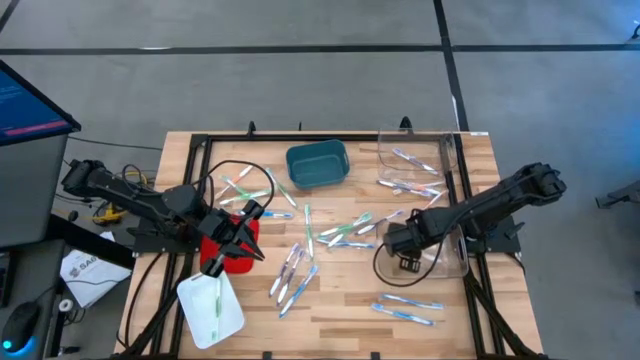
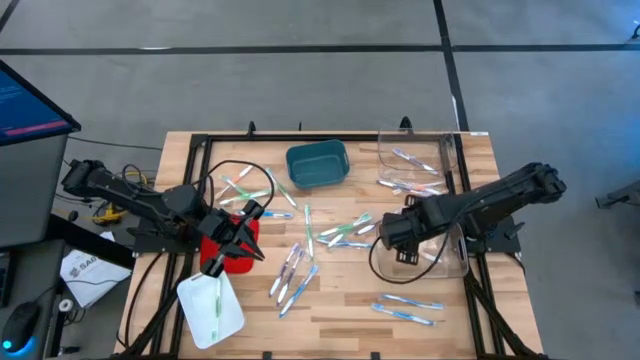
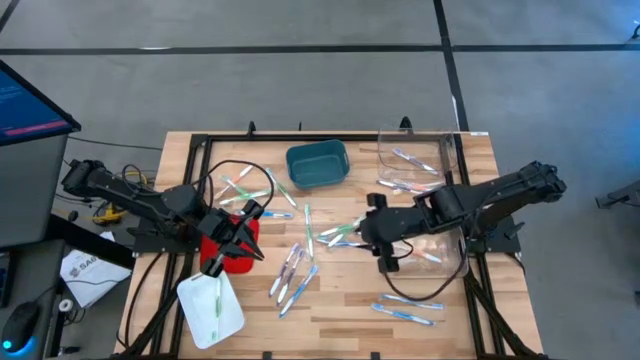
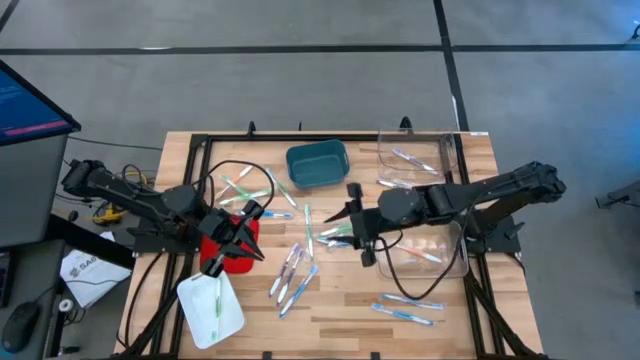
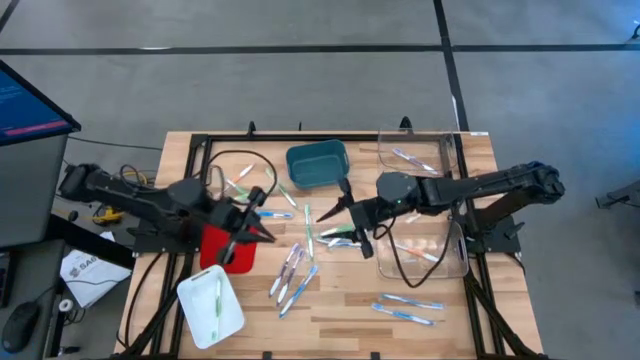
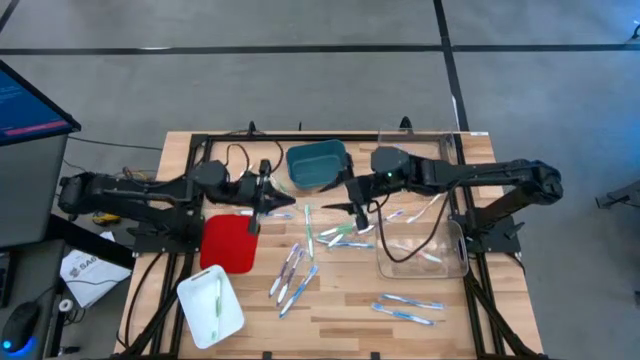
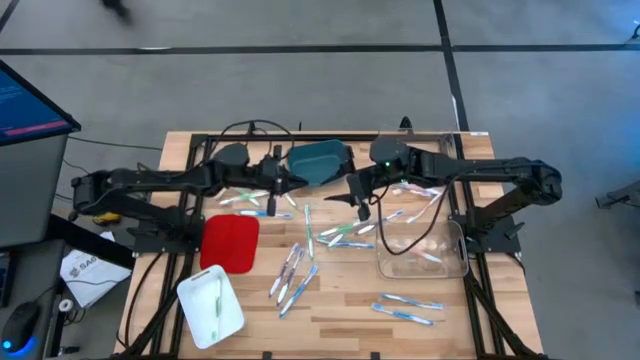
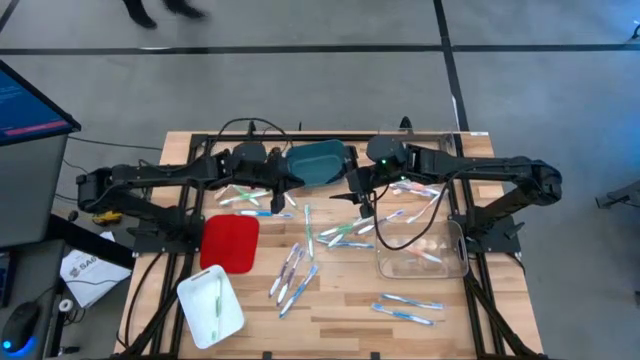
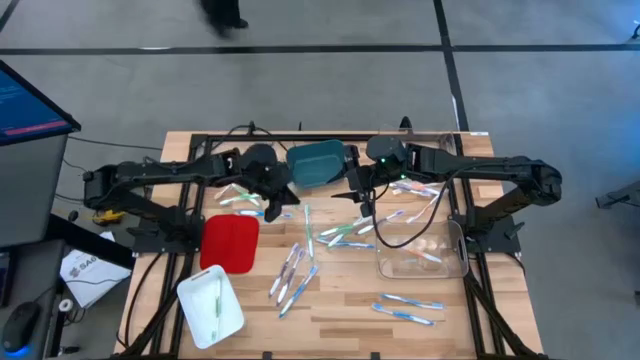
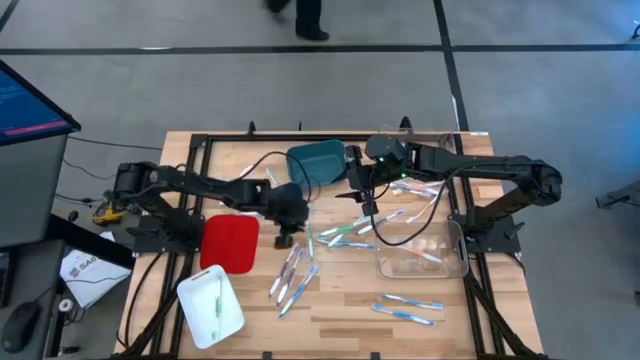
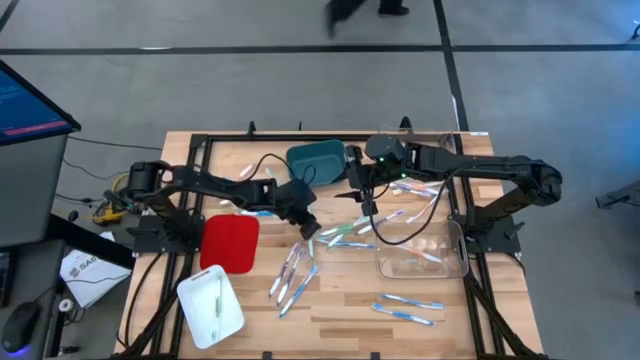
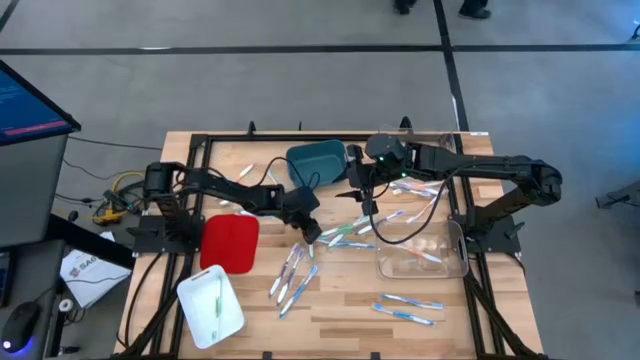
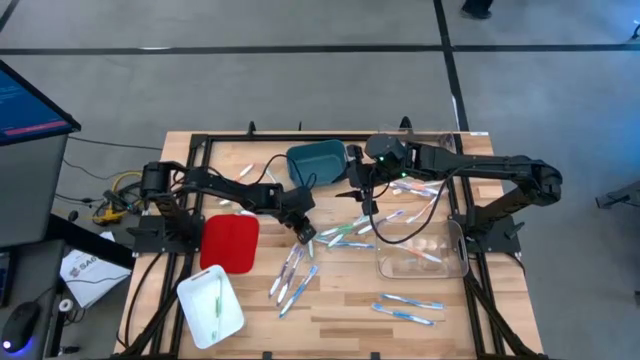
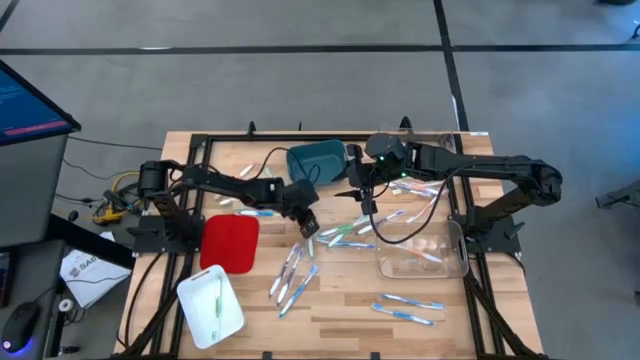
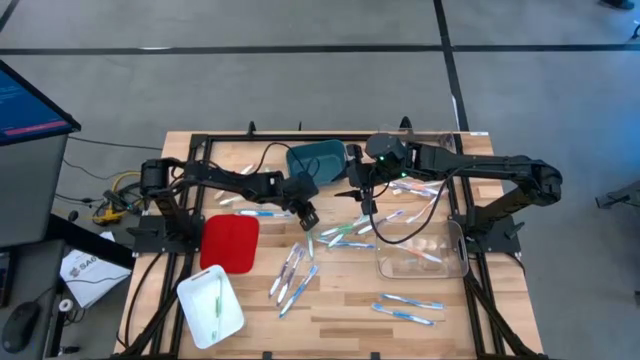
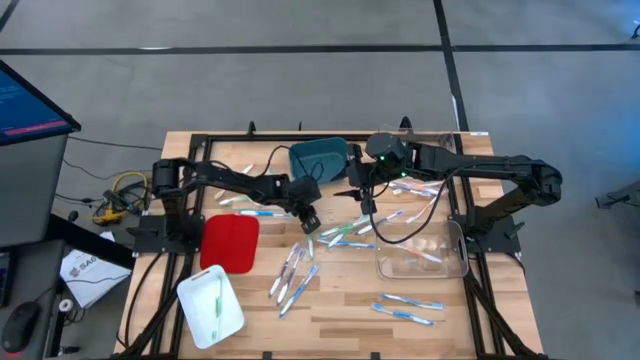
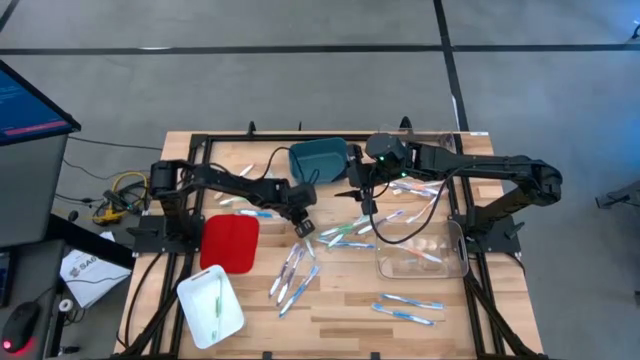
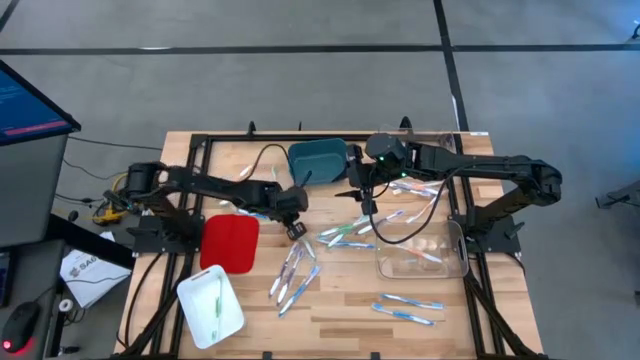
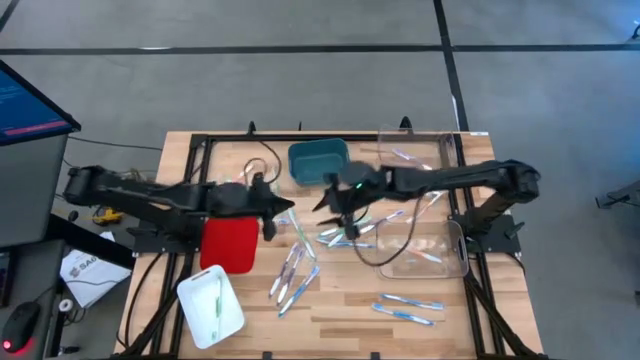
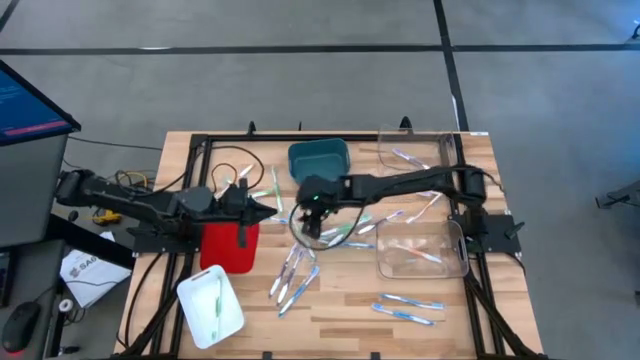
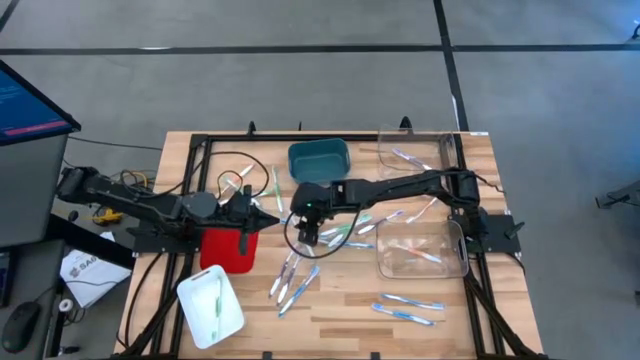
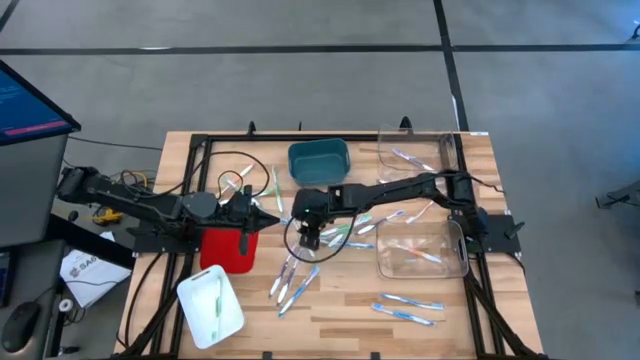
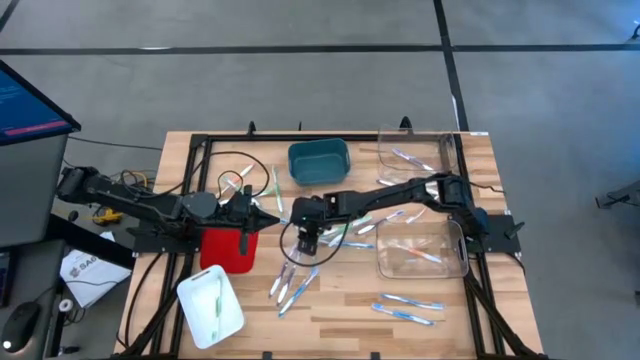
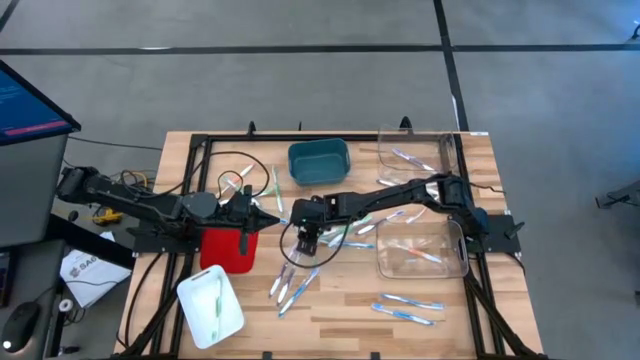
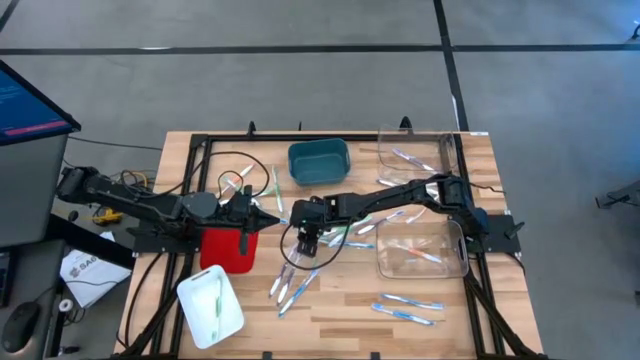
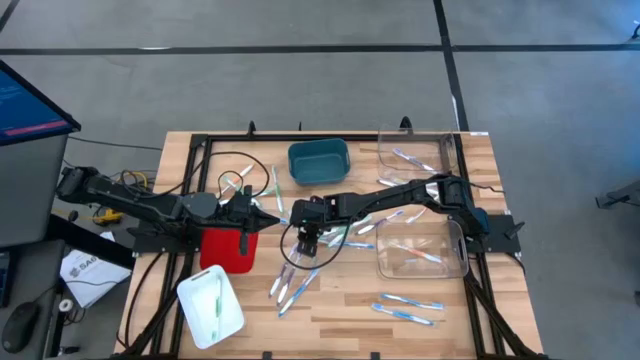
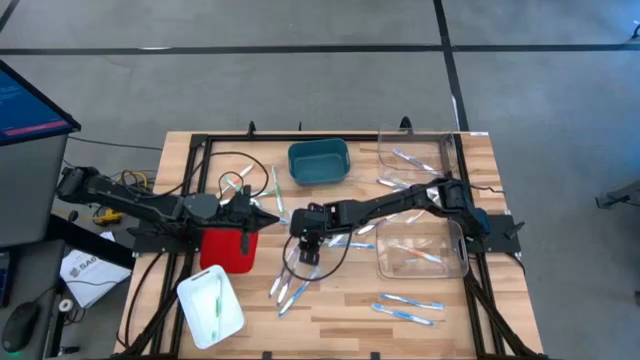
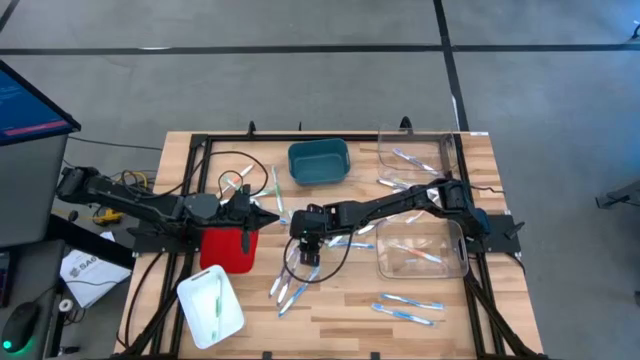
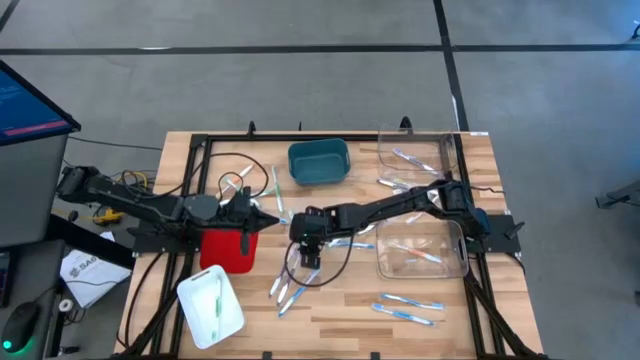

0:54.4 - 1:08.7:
Task: Pick & Place Toothbrushes
Put the purple toothbrush into the top transparent bin

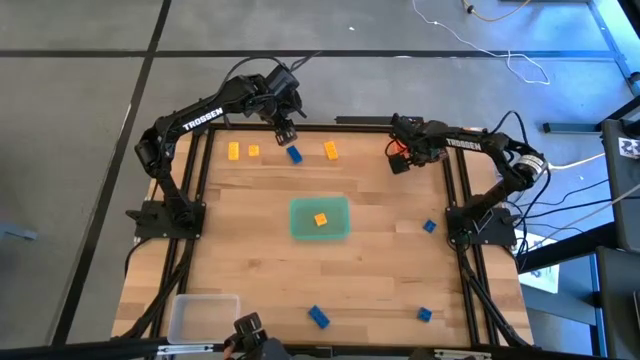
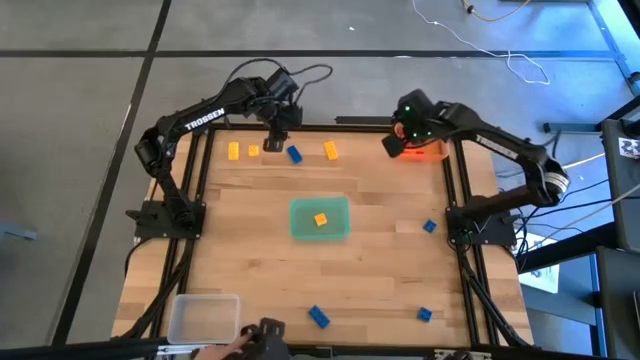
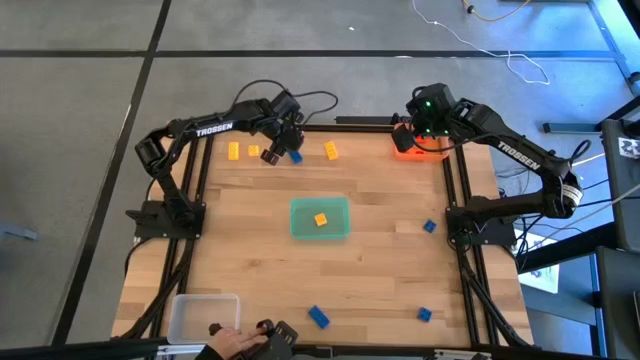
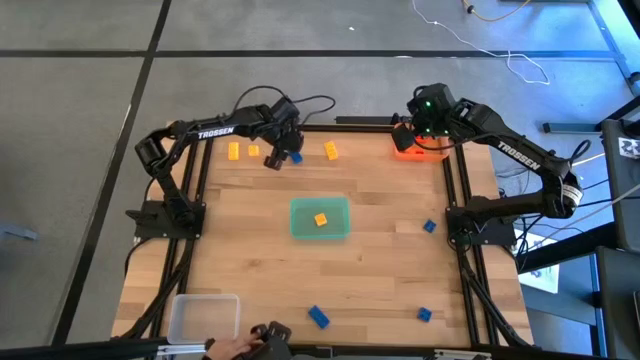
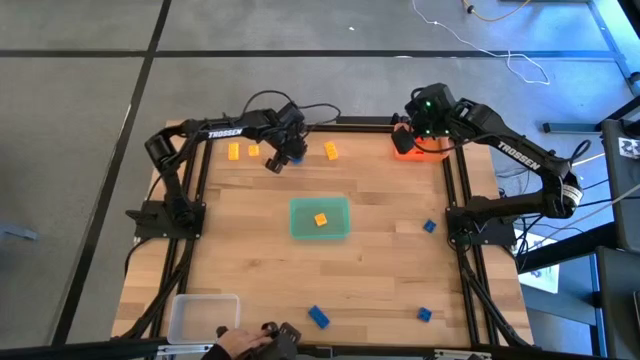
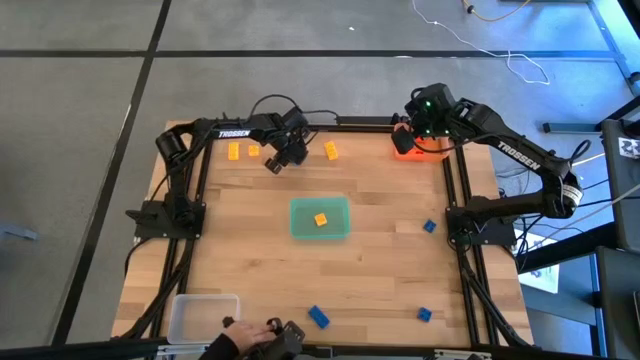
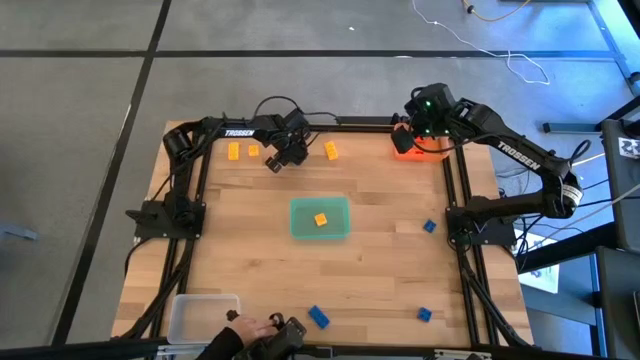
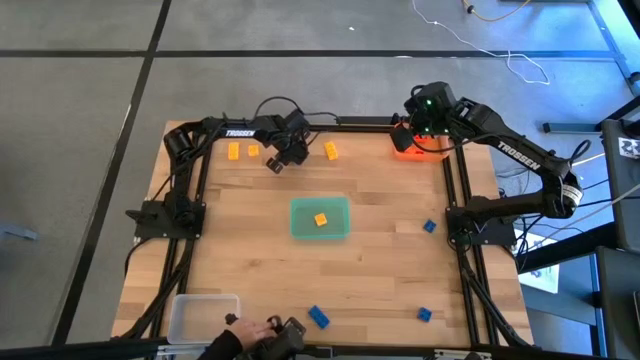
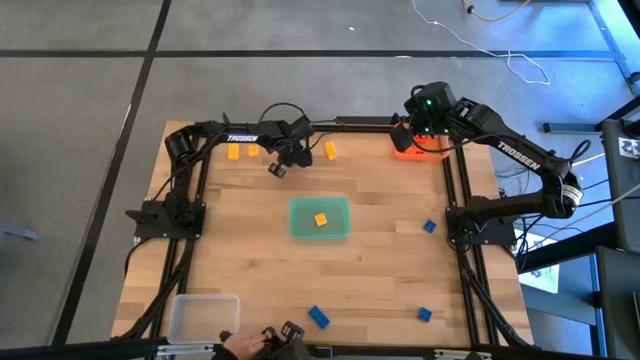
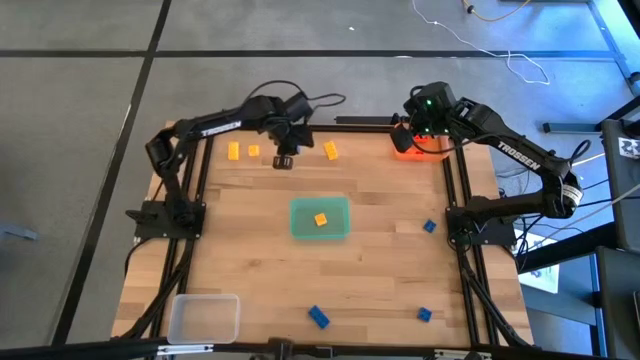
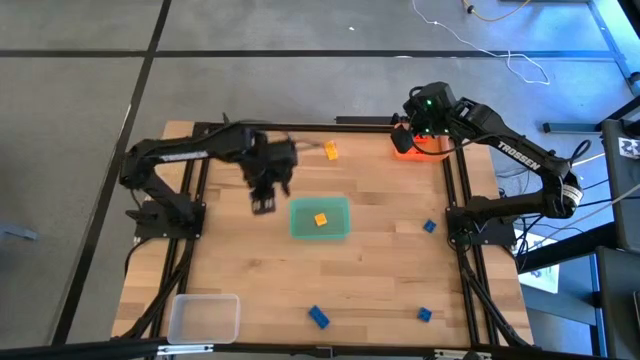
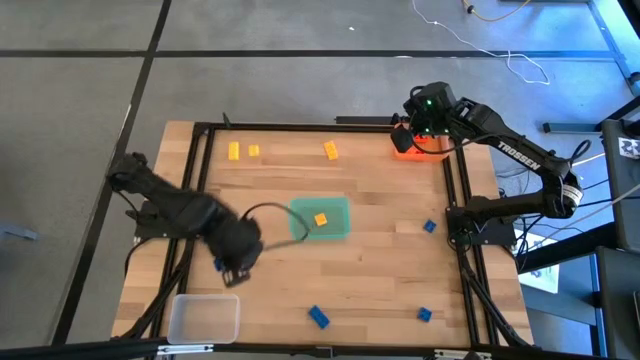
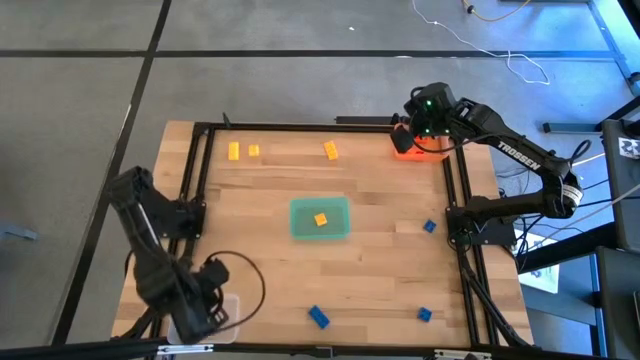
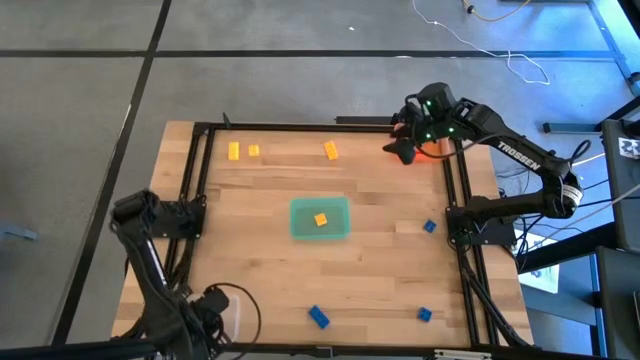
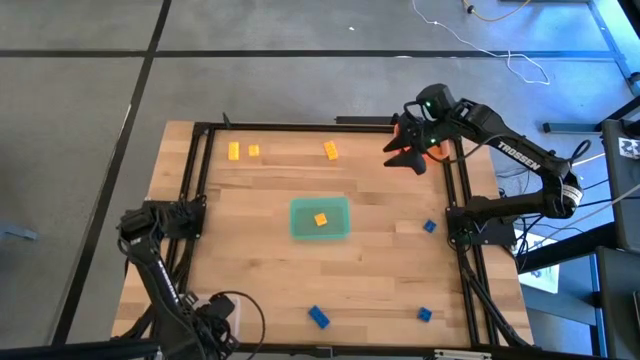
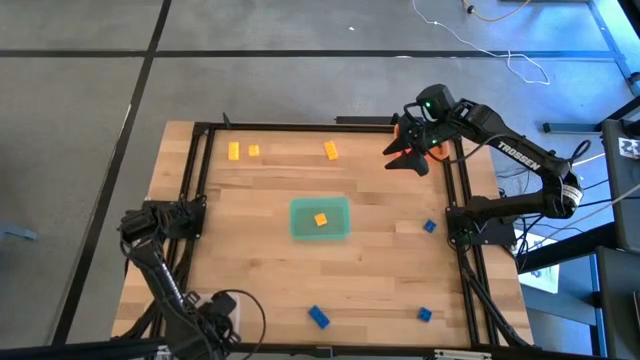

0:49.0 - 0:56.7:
Task: Sort & place blocks by color
Put the blue game piece into the transparent bin
